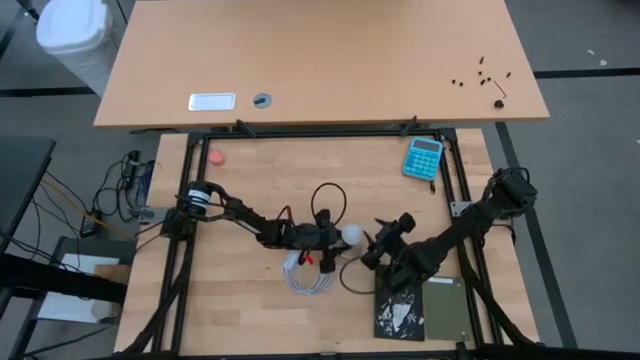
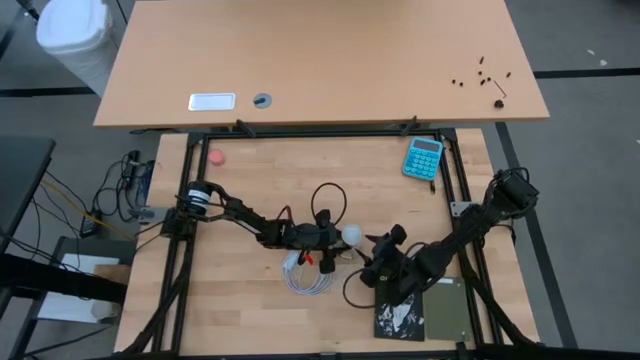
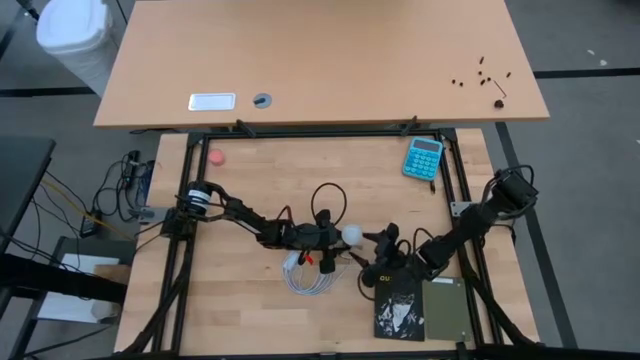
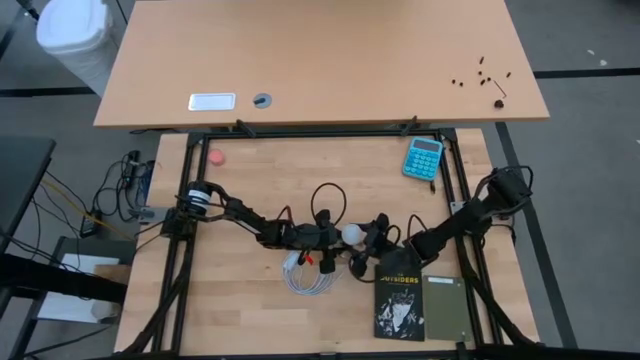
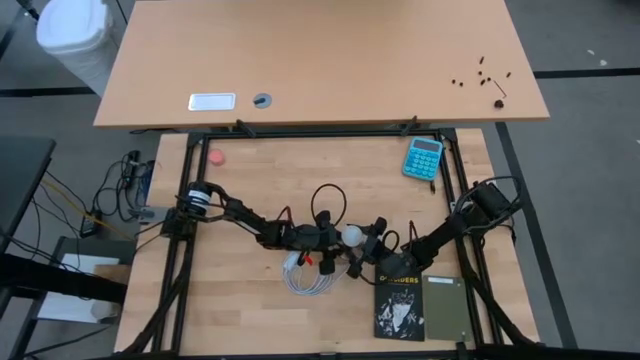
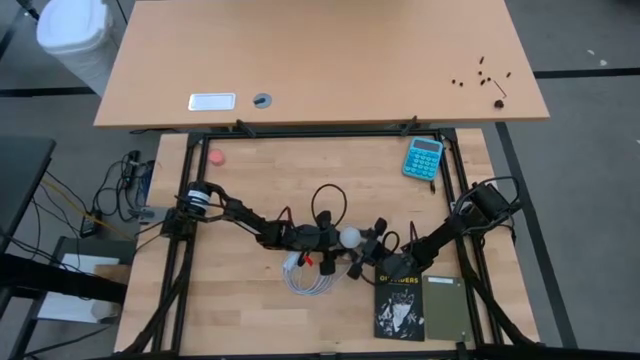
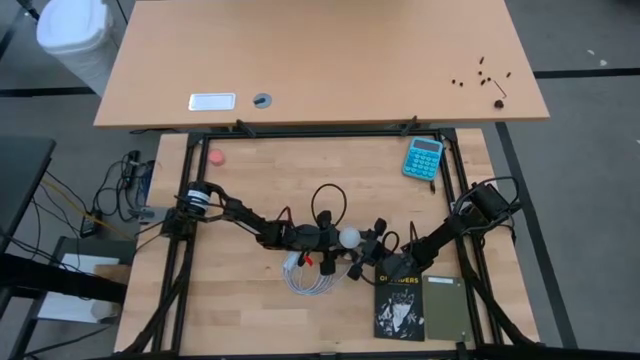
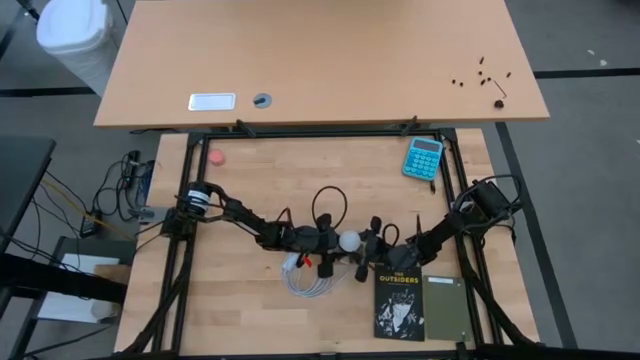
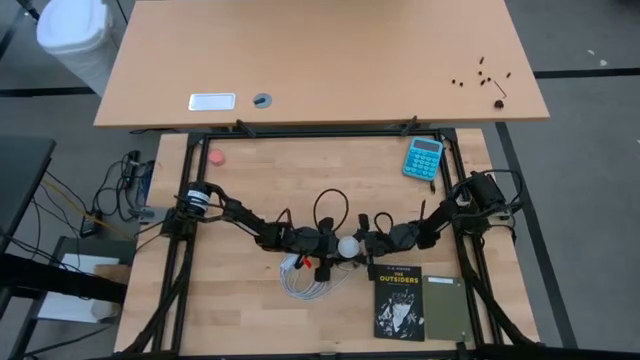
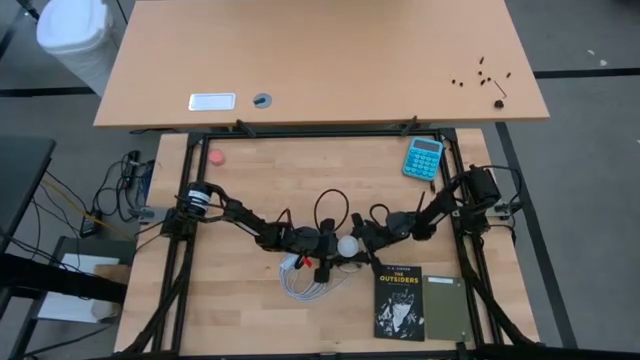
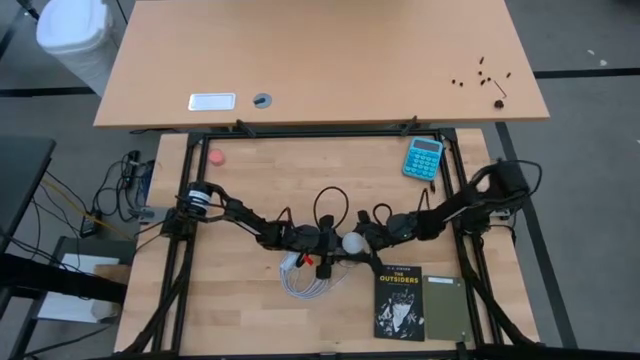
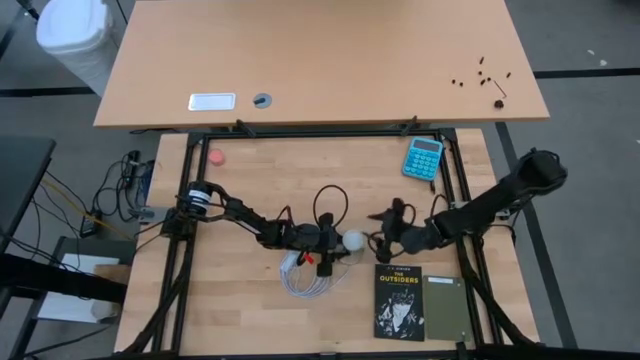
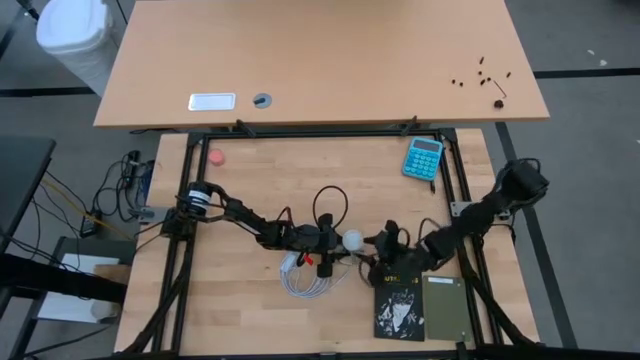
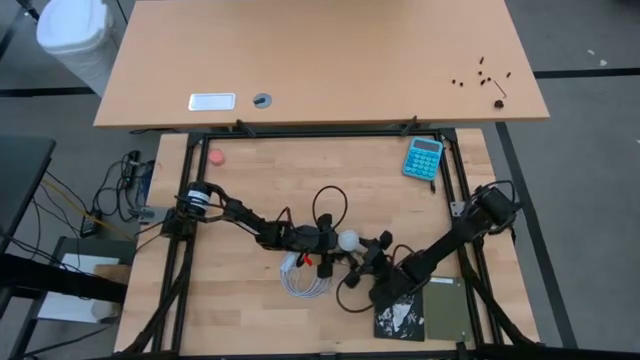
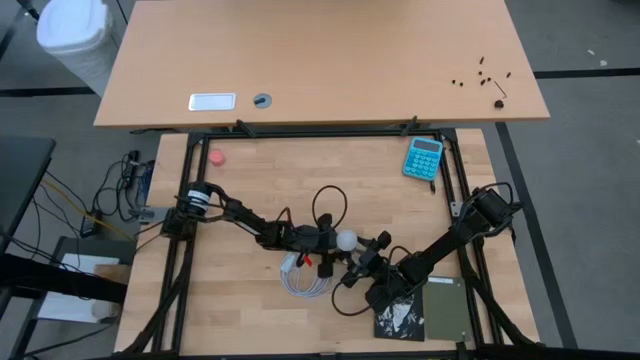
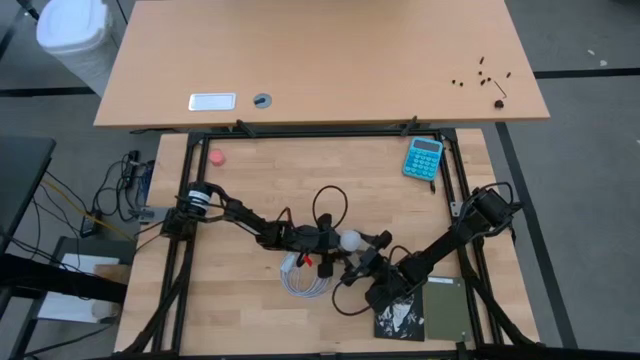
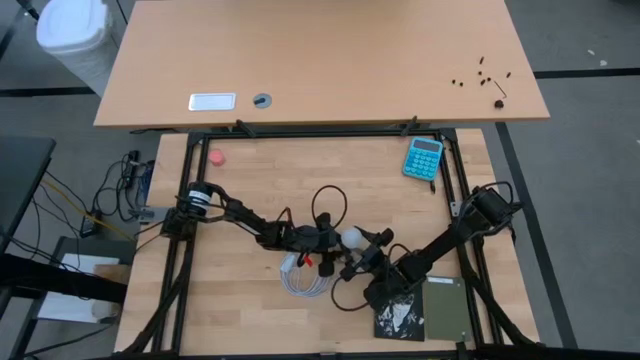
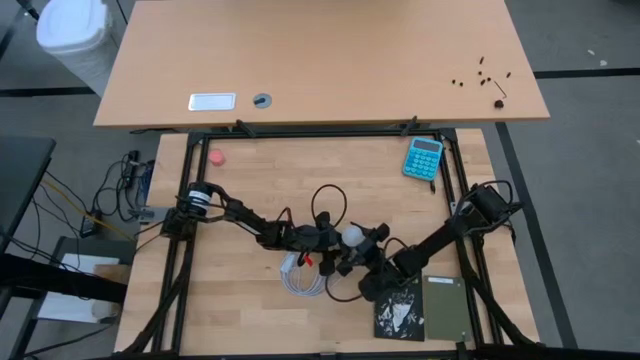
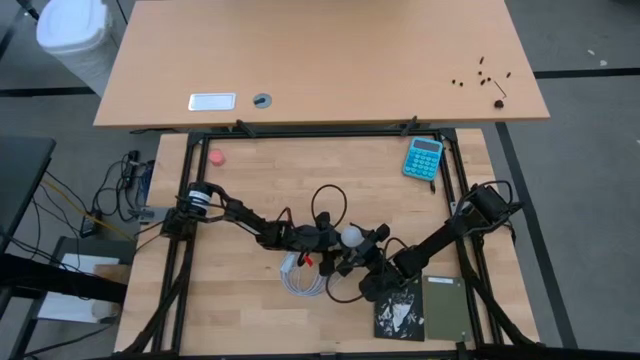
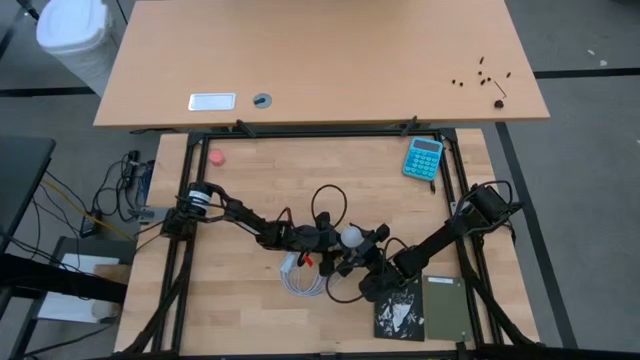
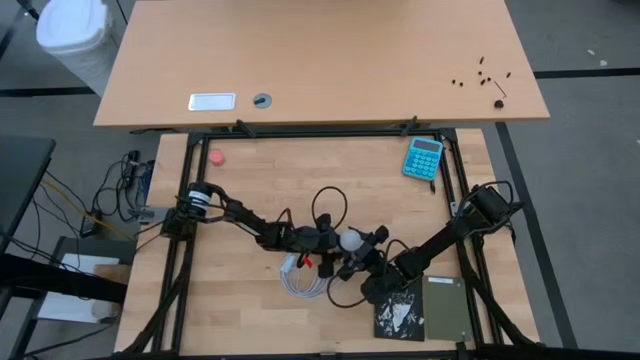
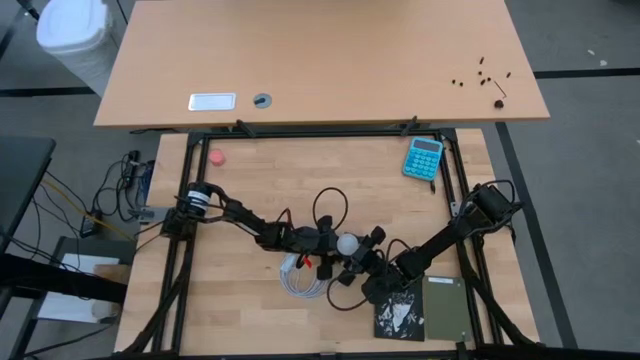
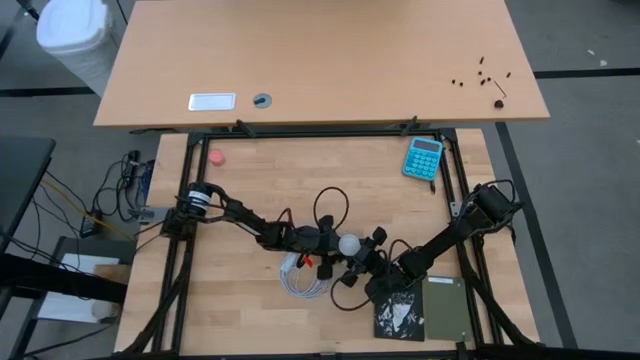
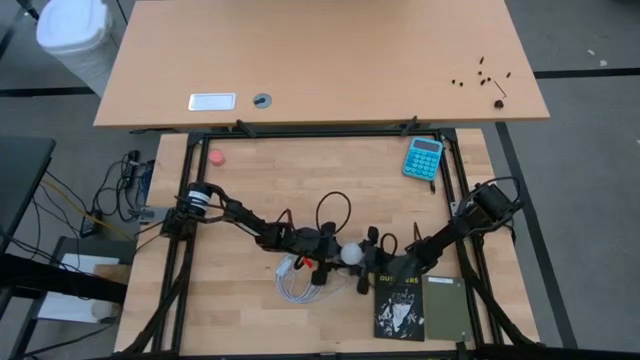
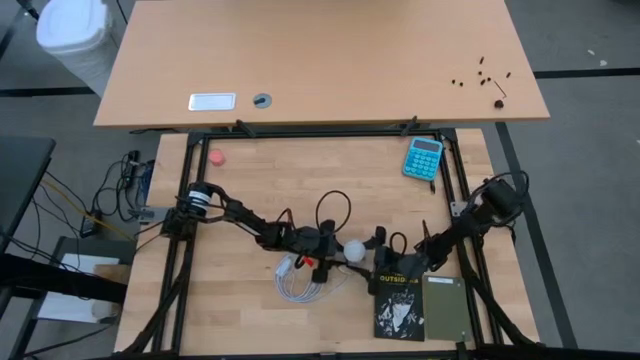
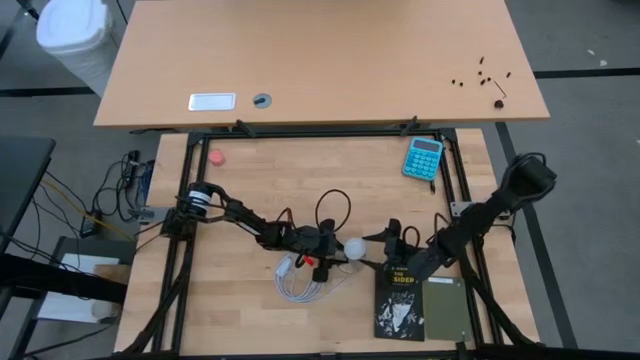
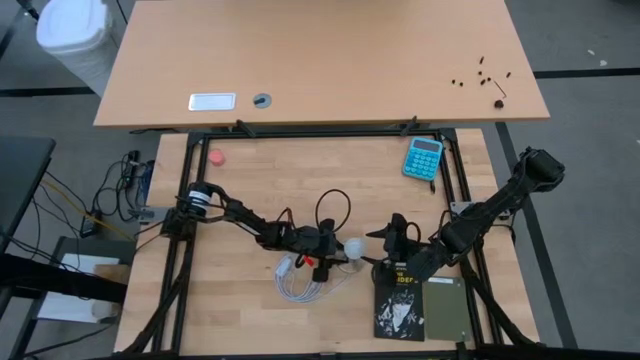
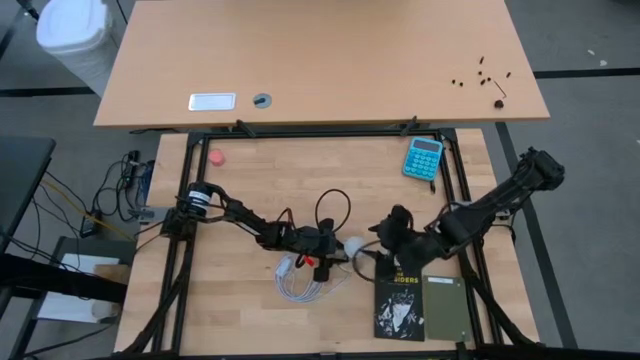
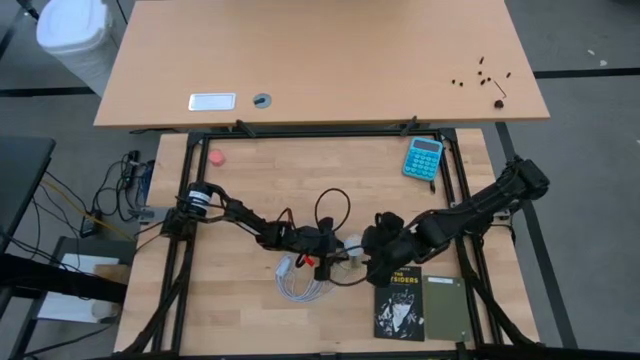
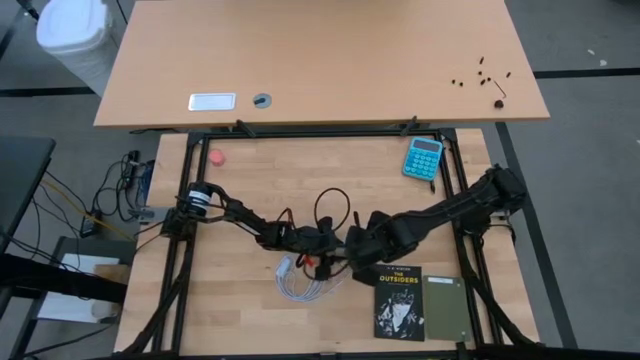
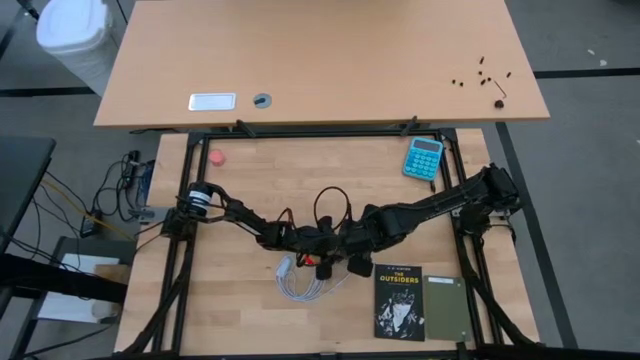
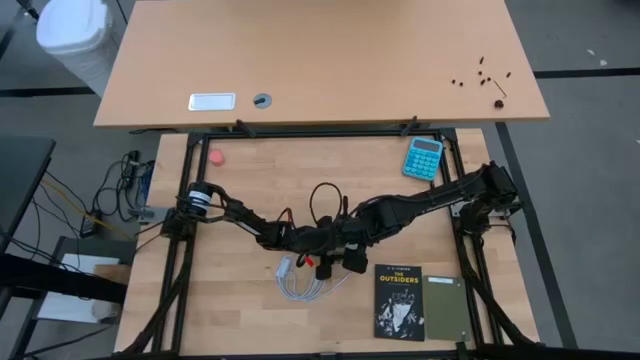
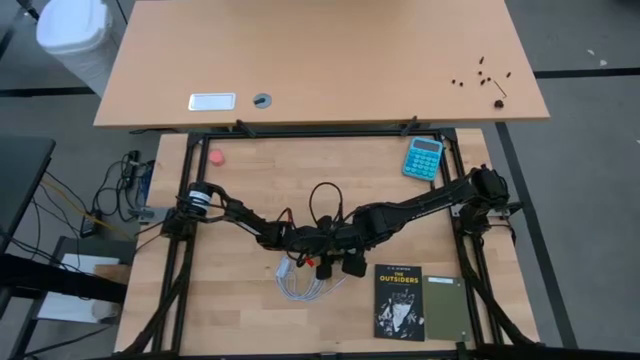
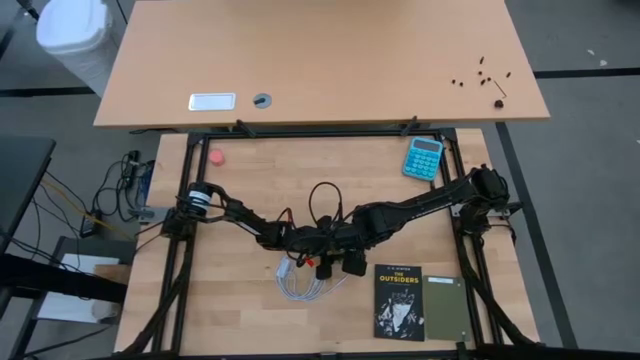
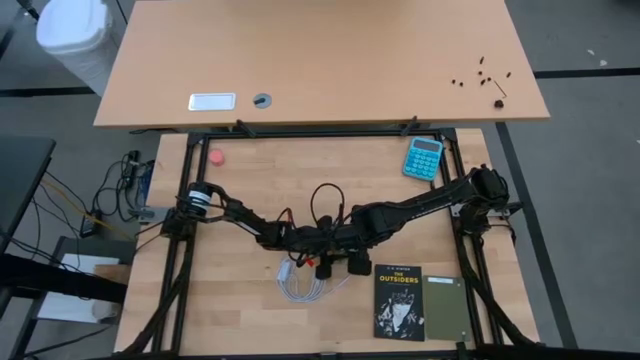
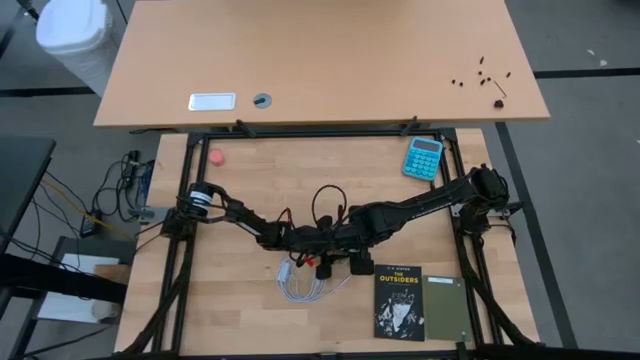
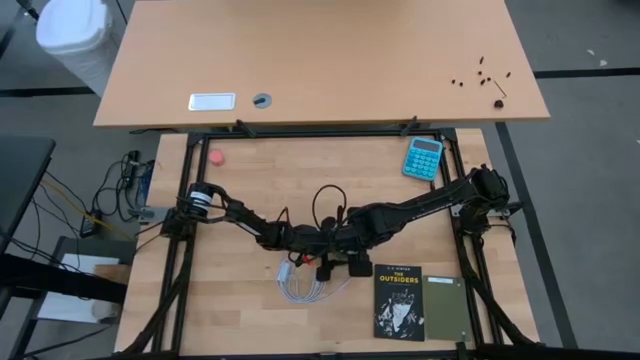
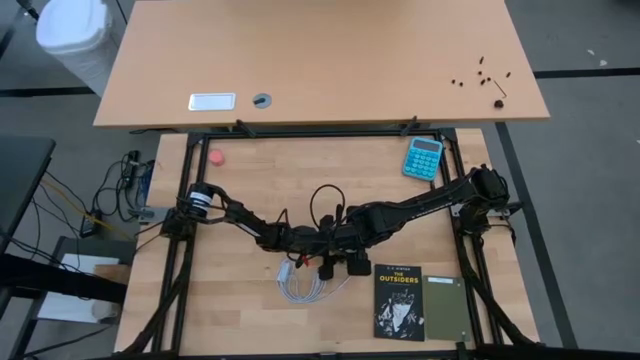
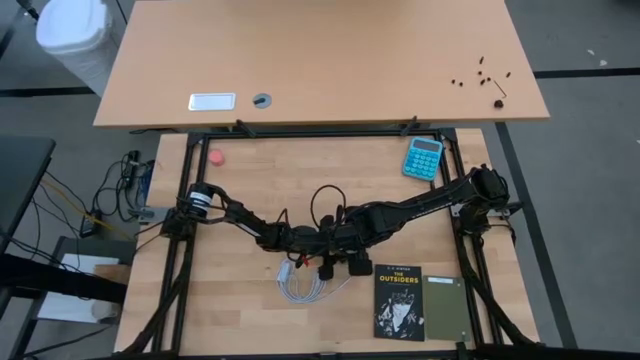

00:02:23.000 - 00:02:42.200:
Task: Screw lightbulb
Remove the white lightbulb into the silver lamp

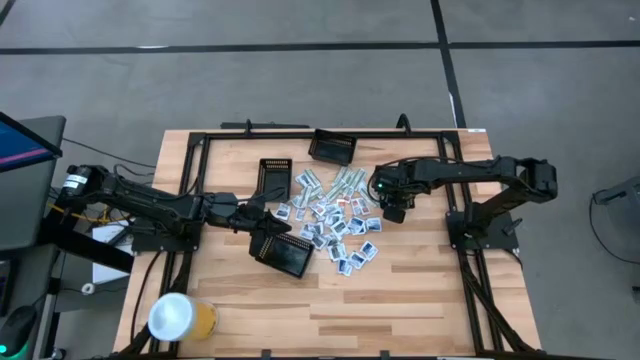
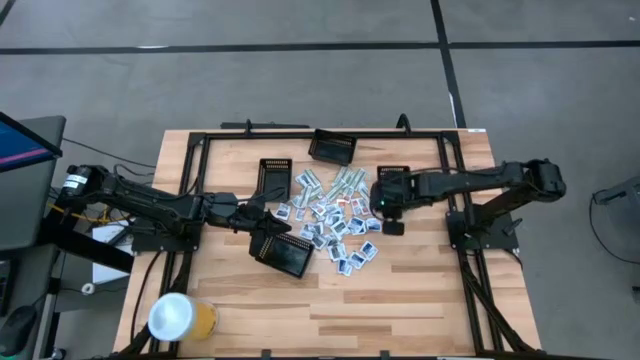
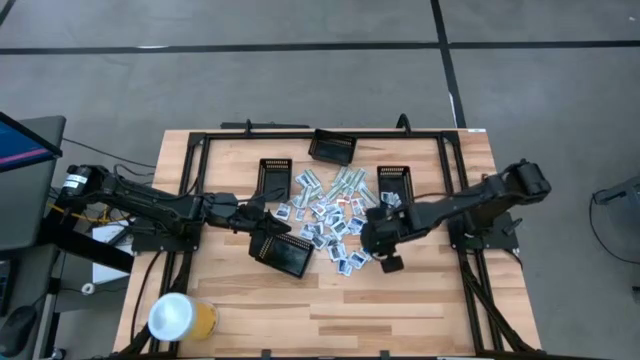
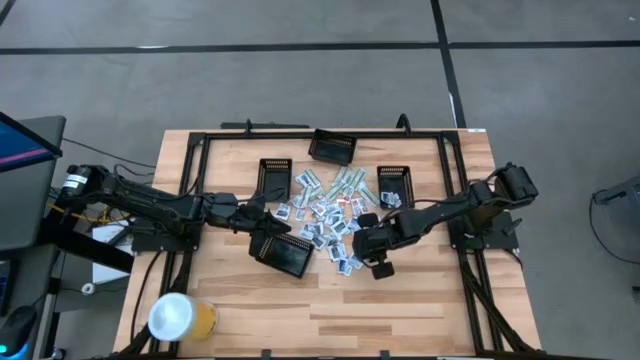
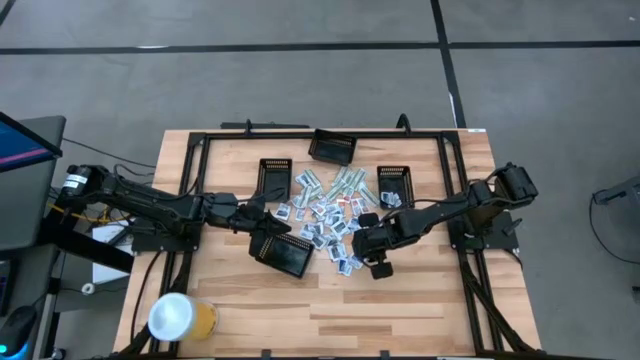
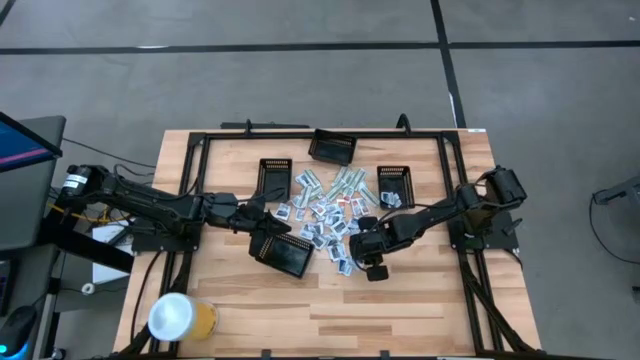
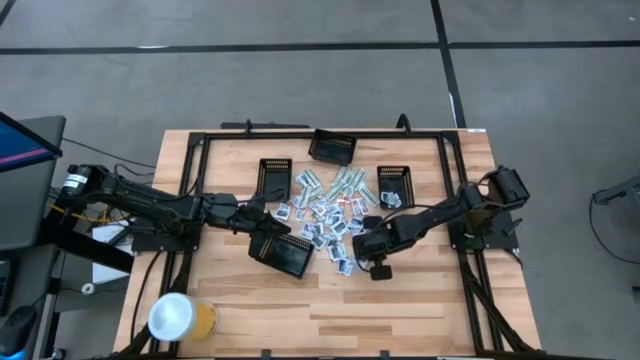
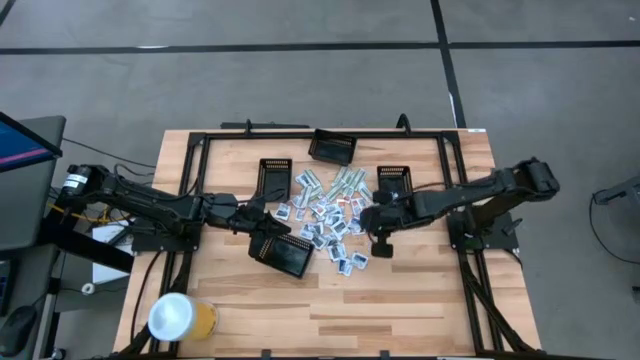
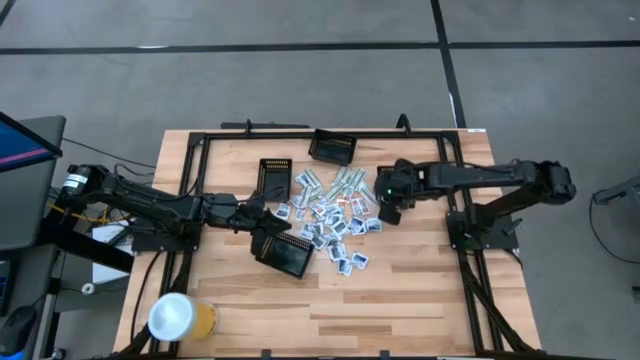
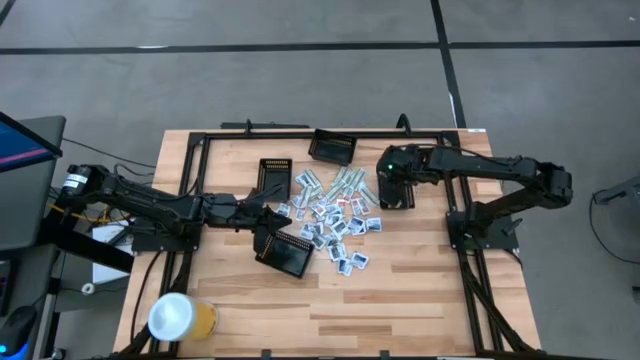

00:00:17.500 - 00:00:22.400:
Task: Pick & Place First Aid Supplies
Put the white alcohol pad into the right black bin
